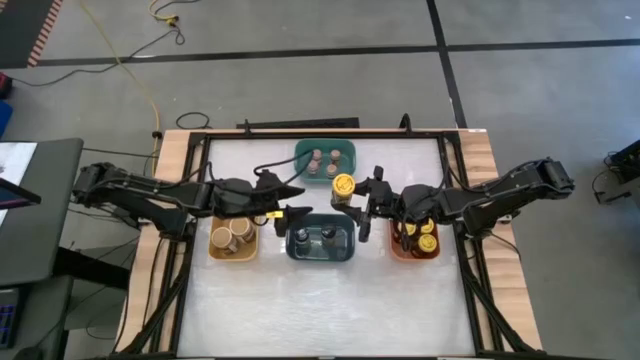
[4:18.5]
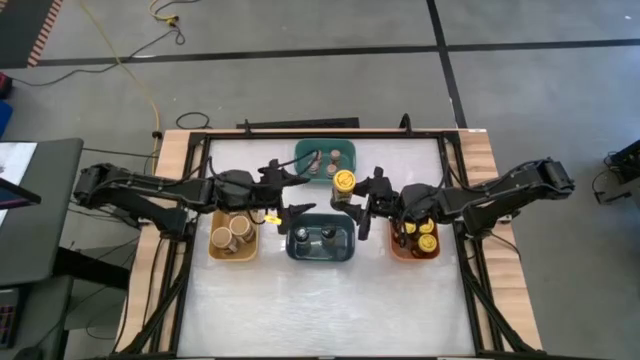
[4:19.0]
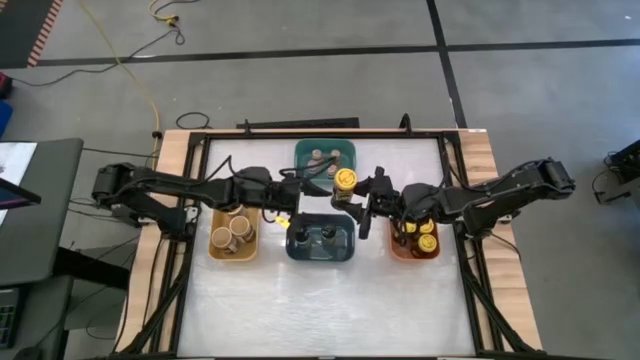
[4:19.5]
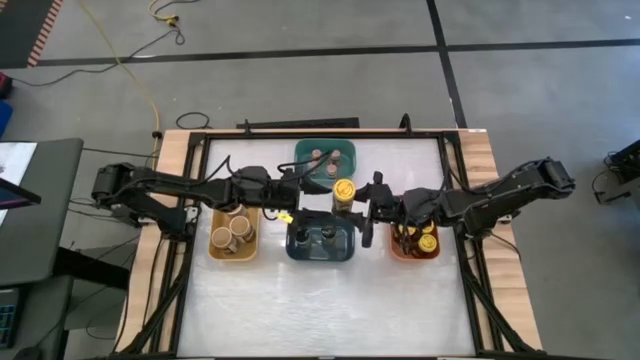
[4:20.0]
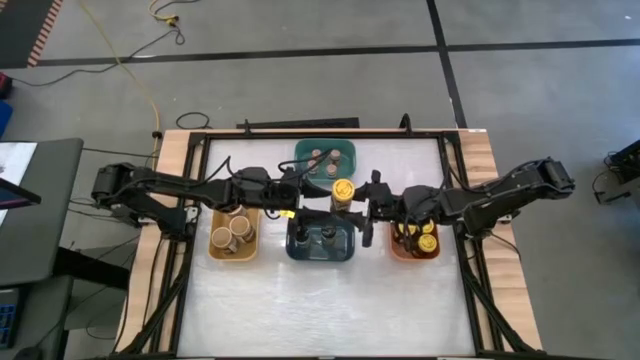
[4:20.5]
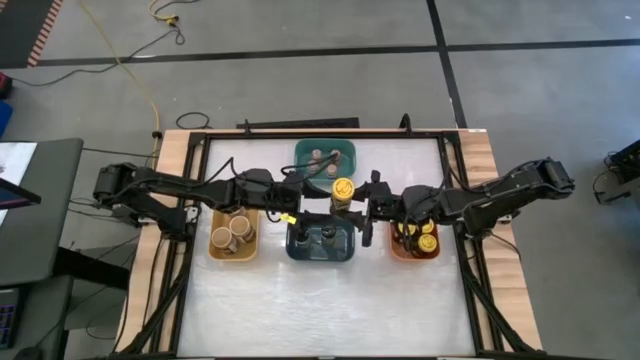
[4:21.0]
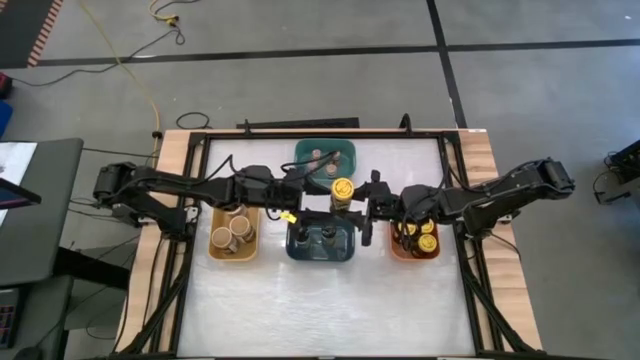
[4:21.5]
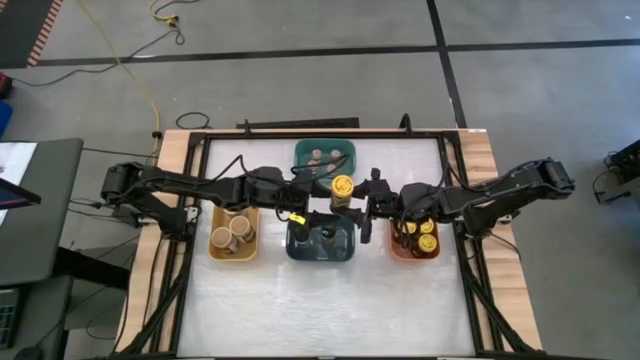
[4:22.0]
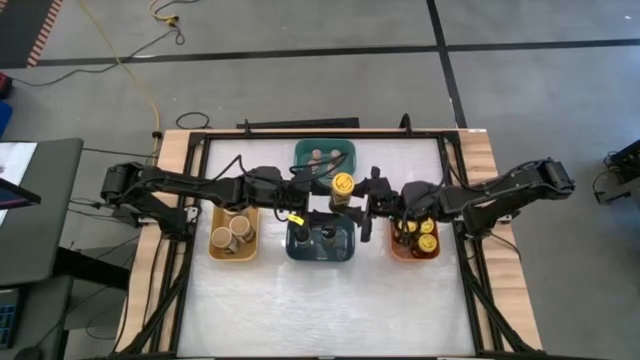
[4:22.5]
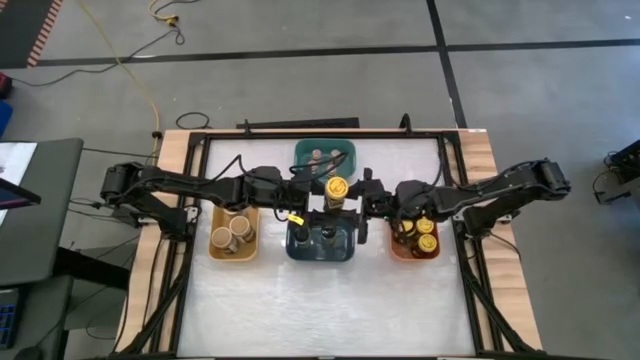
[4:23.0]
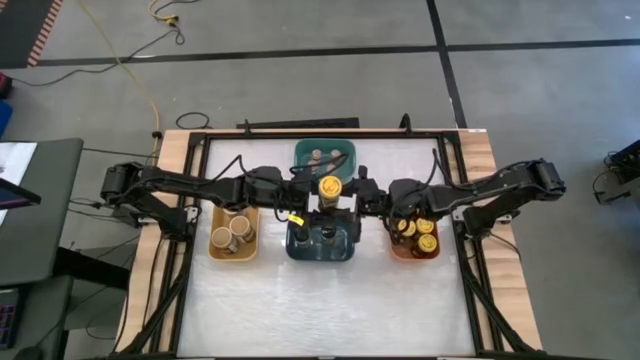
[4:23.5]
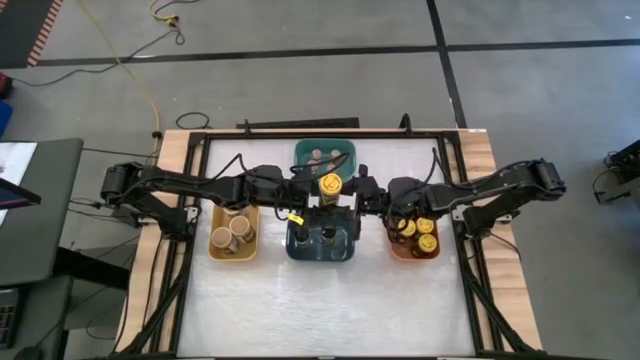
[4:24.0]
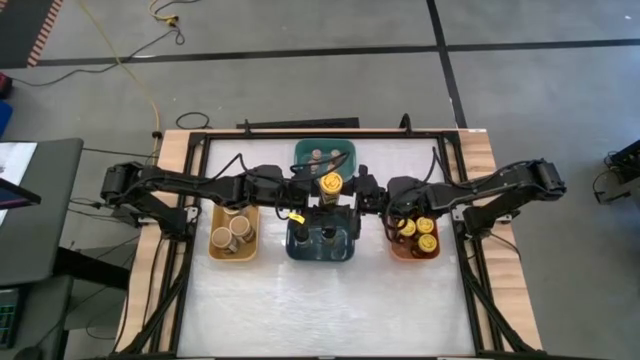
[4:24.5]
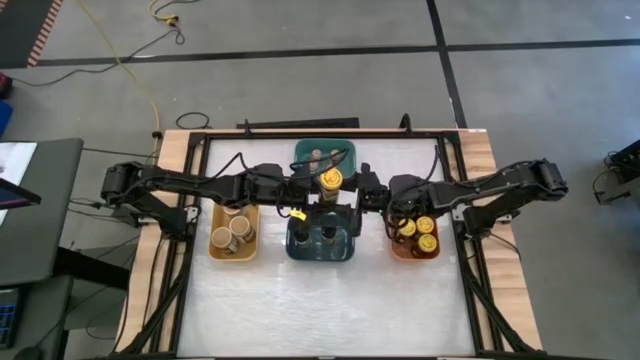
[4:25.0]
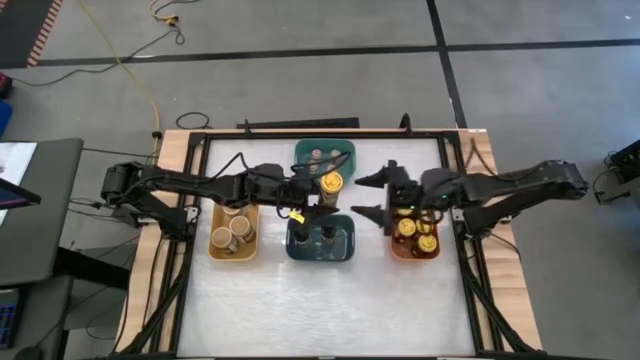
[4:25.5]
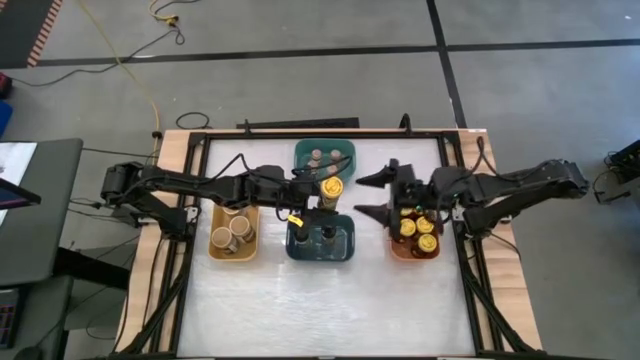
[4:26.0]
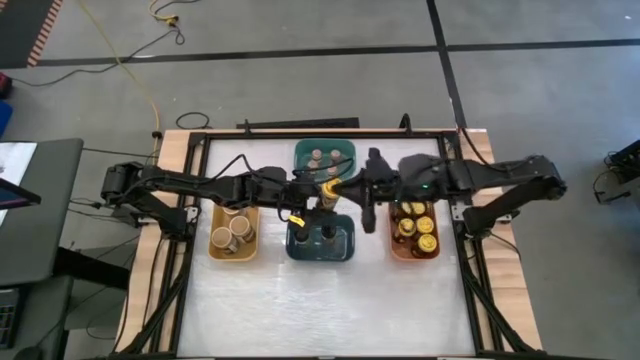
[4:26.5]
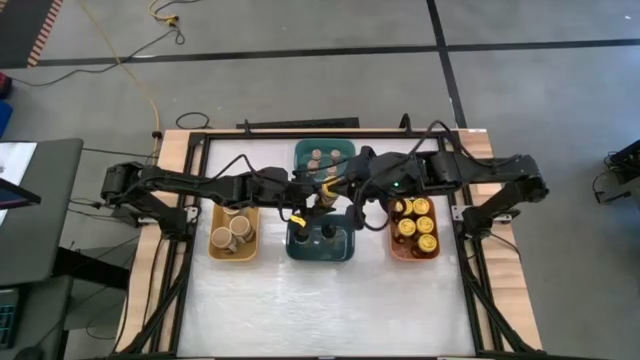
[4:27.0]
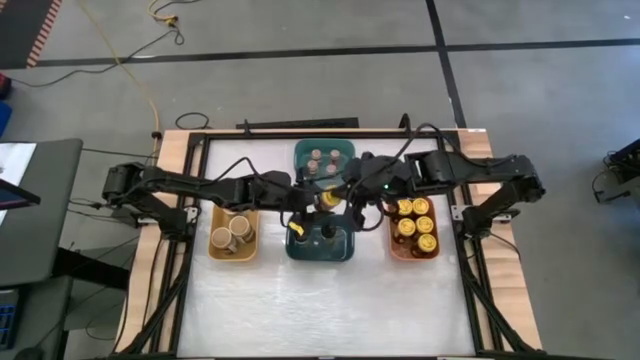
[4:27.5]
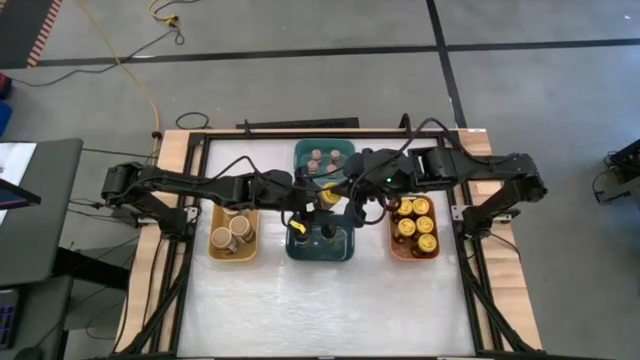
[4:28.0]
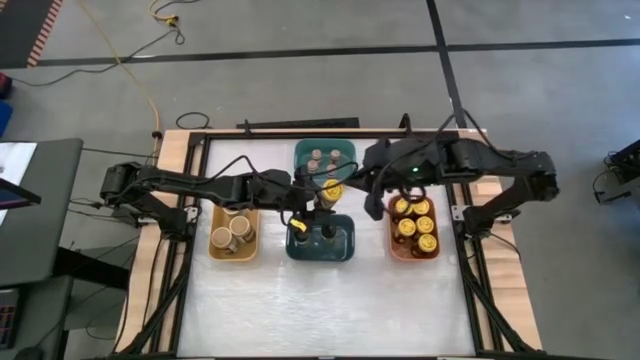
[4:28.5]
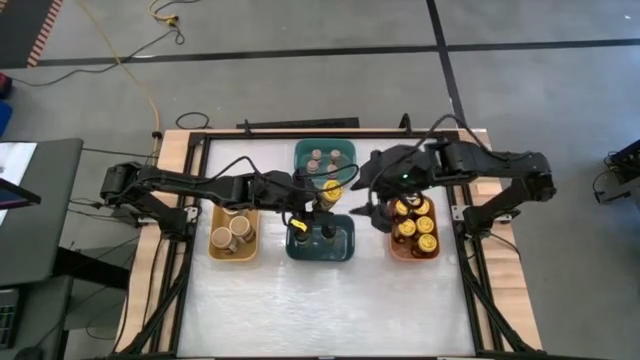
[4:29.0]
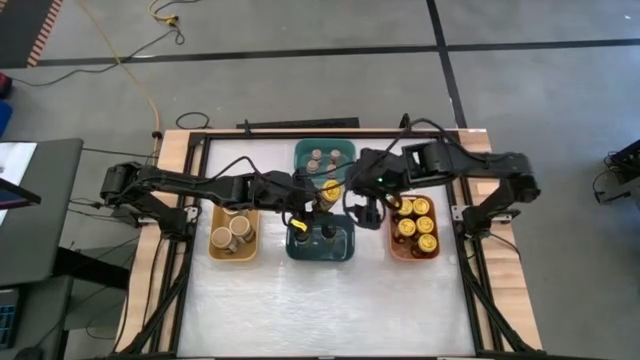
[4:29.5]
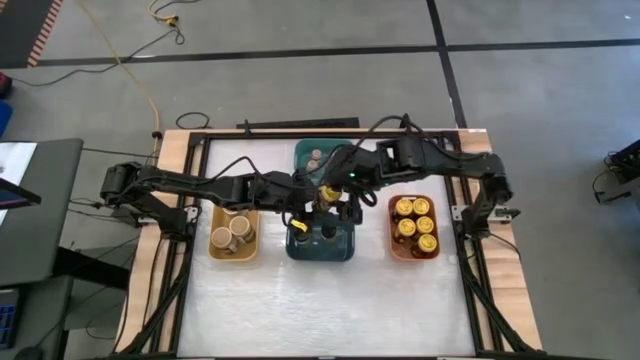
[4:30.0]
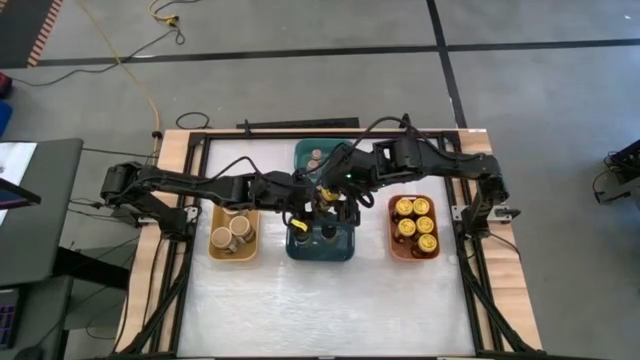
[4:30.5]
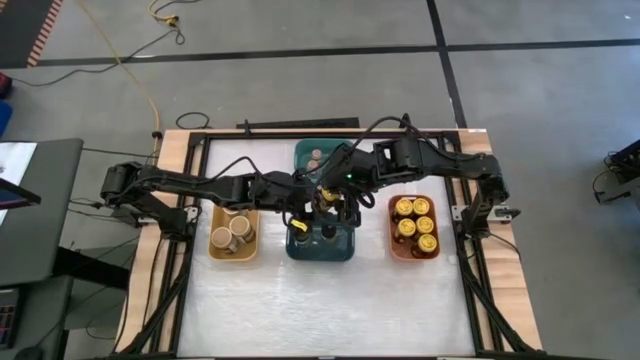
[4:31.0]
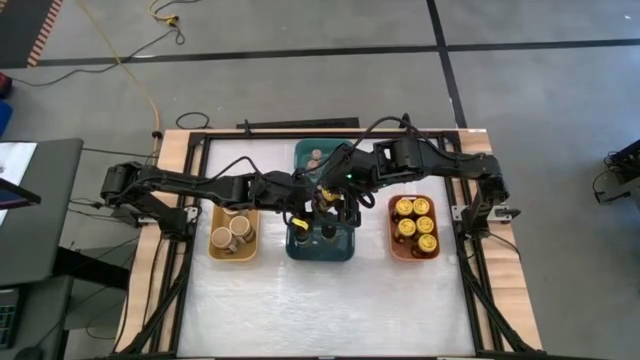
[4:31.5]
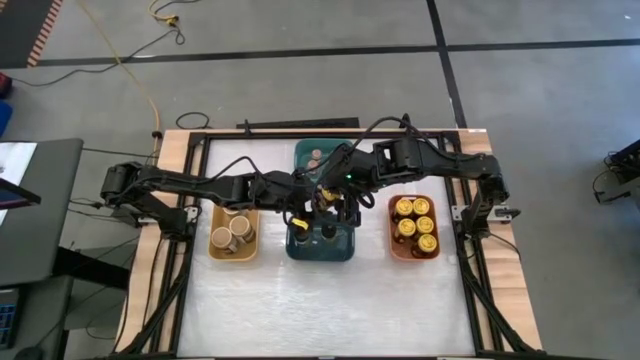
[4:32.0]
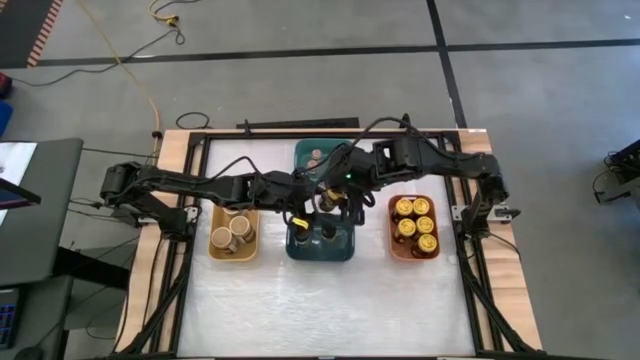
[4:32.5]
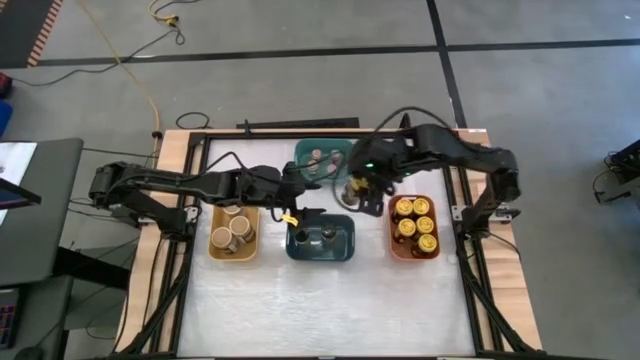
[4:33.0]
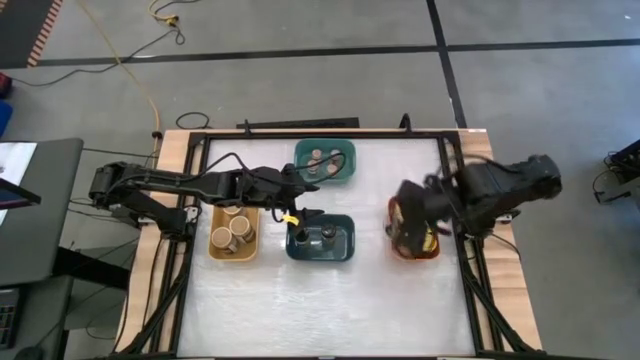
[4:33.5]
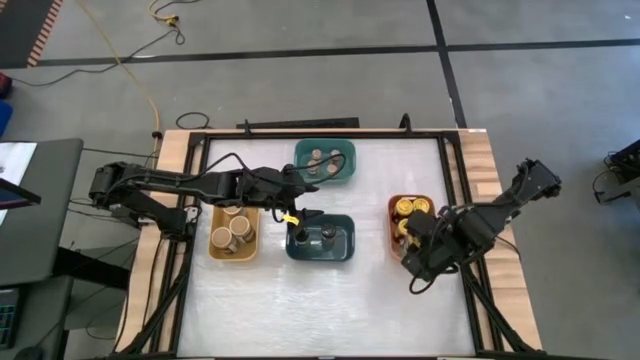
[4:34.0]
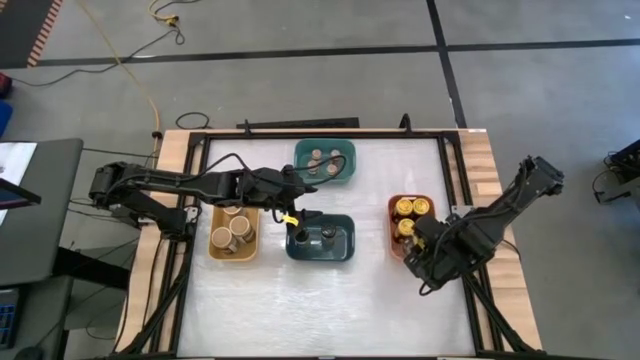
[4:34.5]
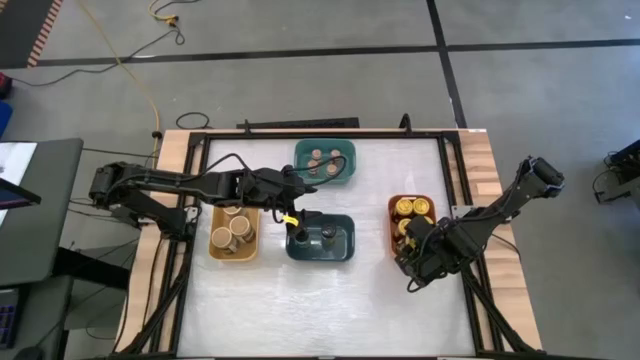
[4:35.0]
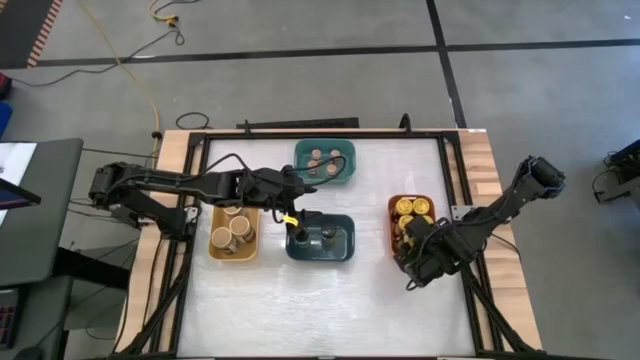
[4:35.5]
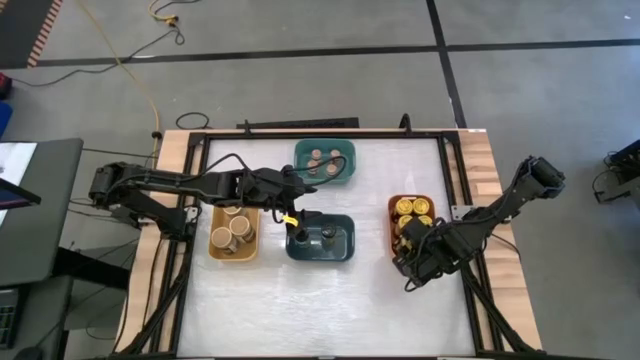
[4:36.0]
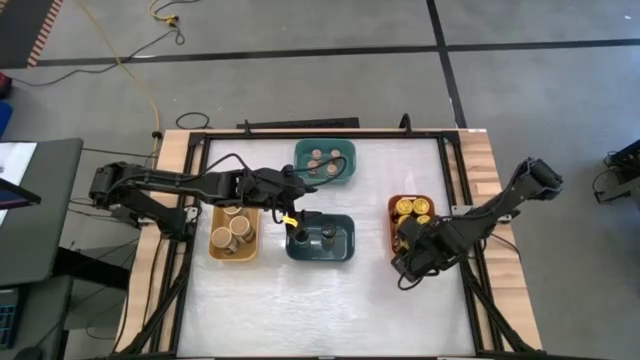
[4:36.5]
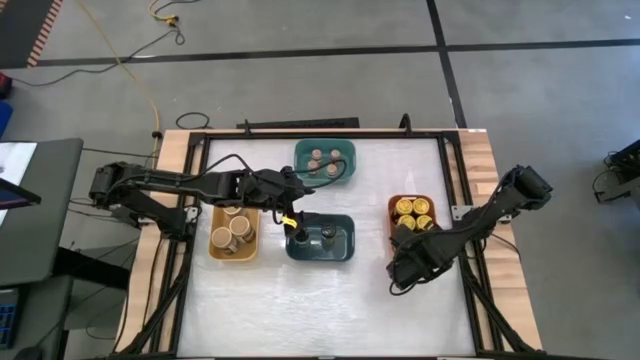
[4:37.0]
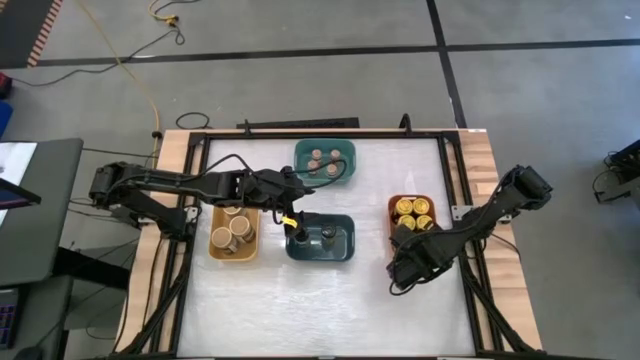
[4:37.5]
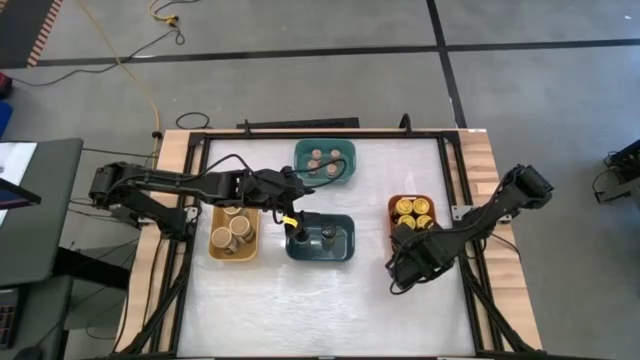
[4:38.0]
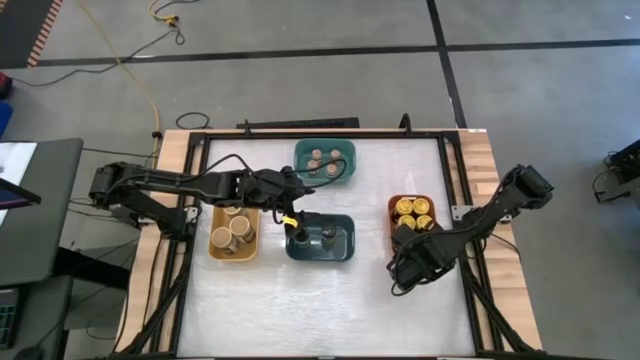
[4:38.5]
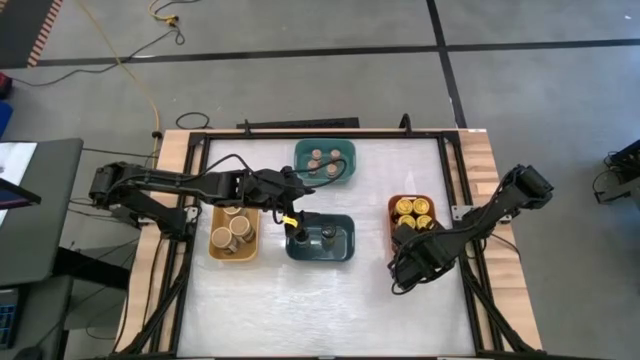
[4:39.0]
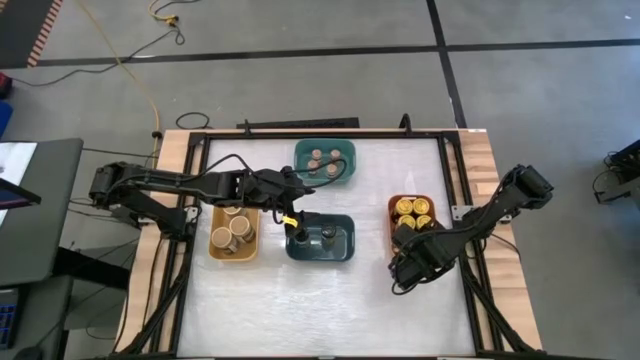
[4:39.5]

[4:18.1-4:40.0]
Task: Sort spices by type
Put the yellow seasoning into the orange bin
